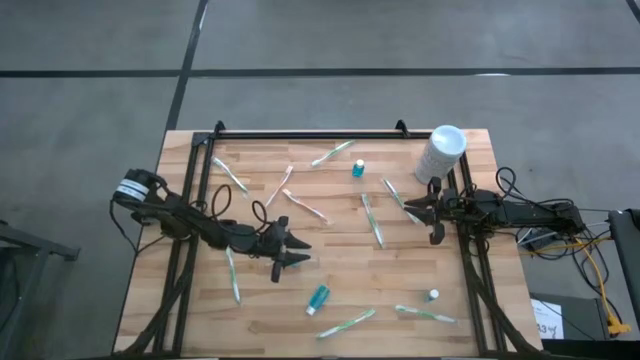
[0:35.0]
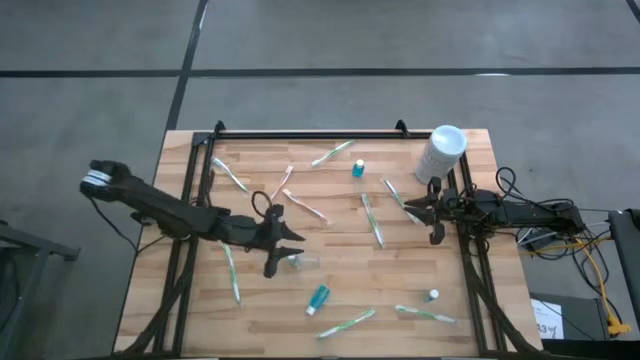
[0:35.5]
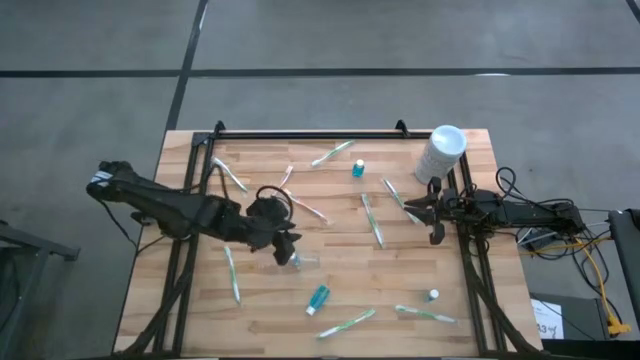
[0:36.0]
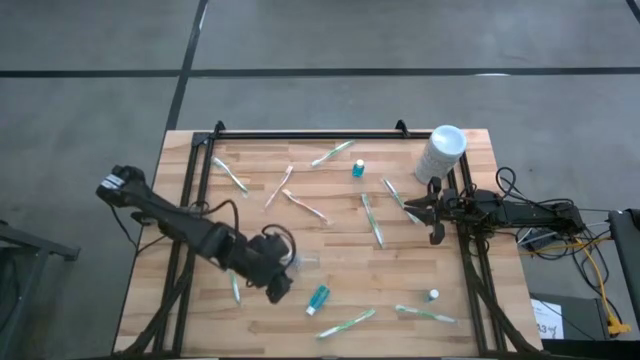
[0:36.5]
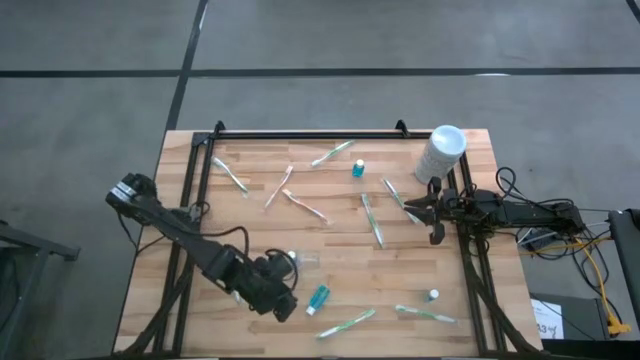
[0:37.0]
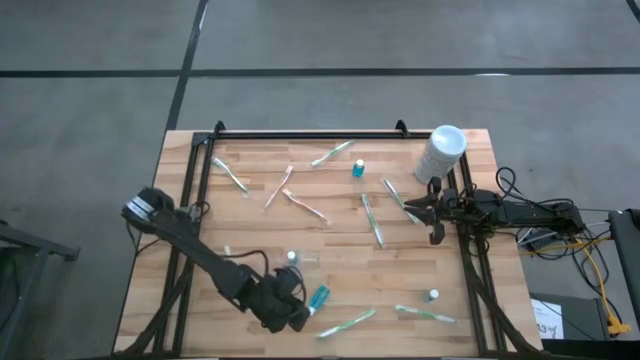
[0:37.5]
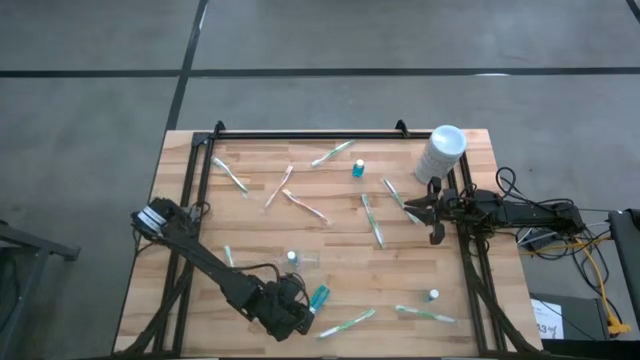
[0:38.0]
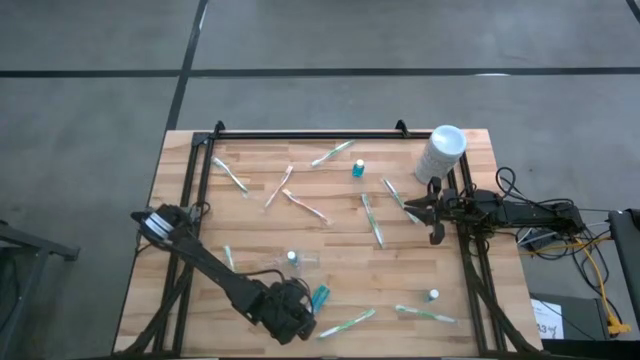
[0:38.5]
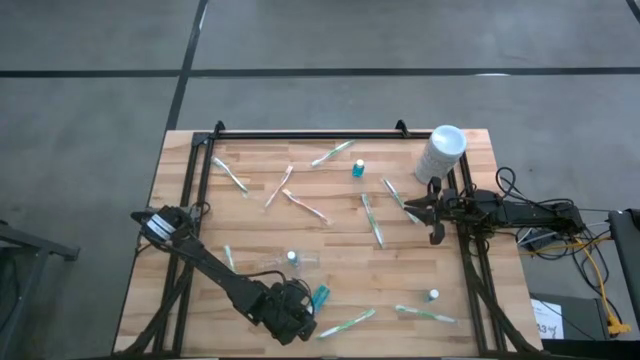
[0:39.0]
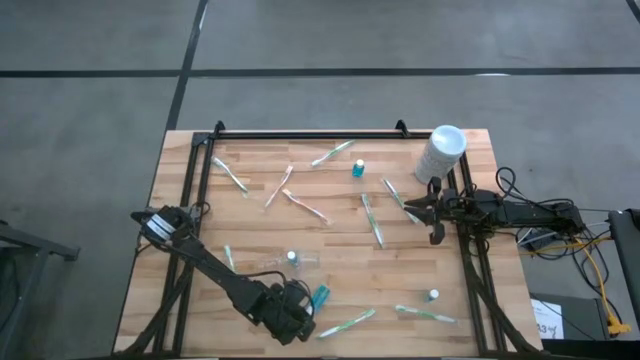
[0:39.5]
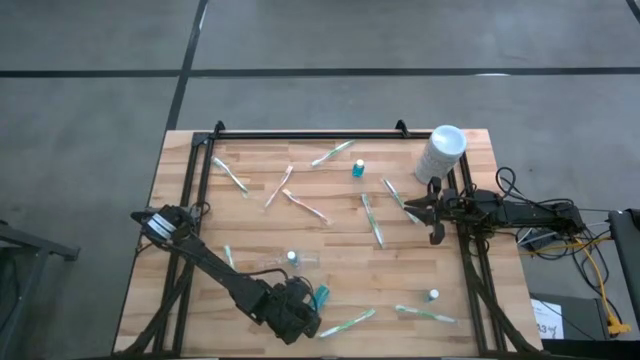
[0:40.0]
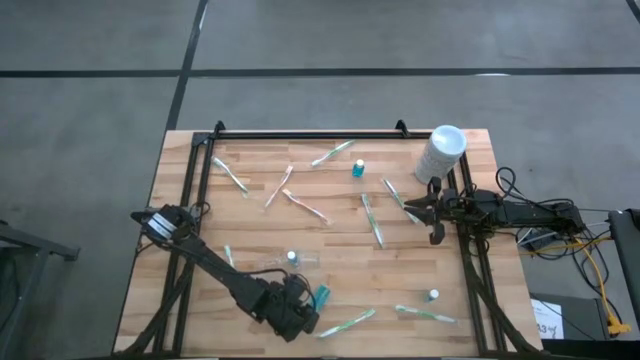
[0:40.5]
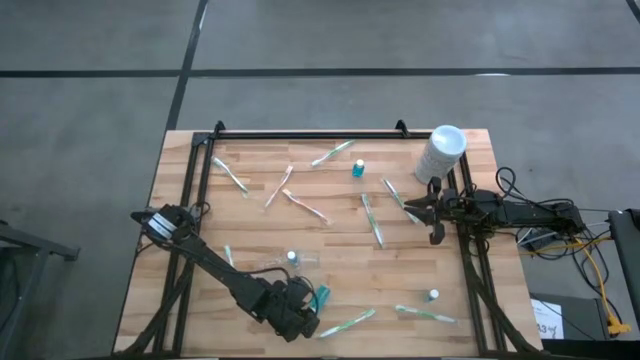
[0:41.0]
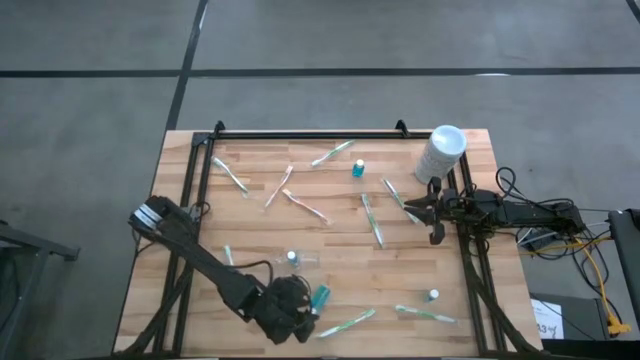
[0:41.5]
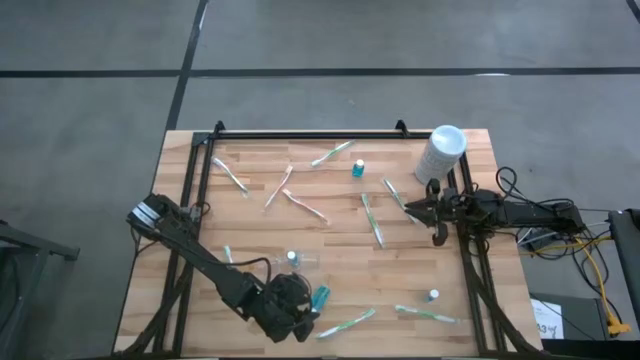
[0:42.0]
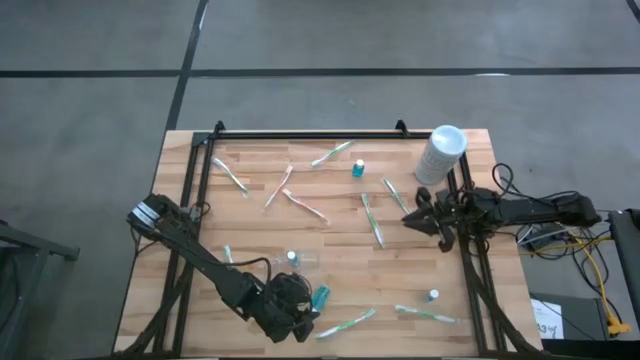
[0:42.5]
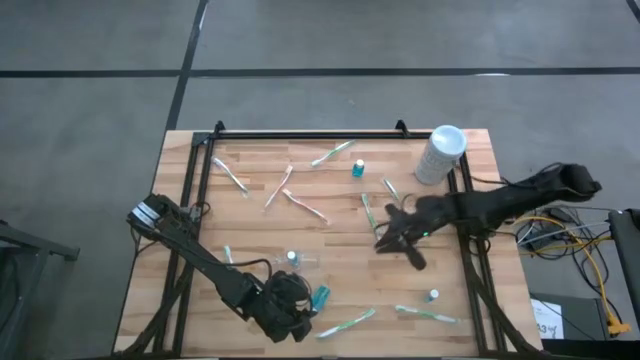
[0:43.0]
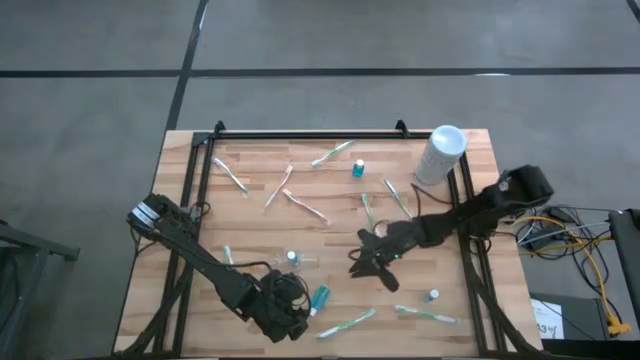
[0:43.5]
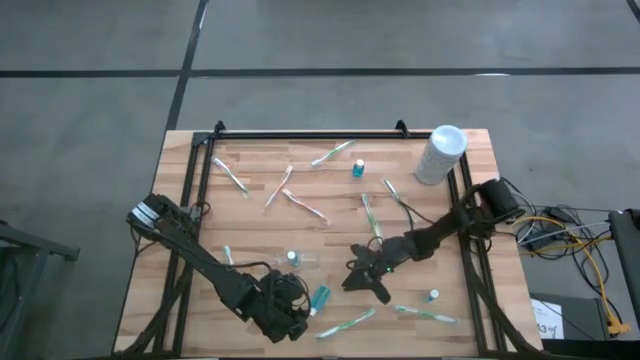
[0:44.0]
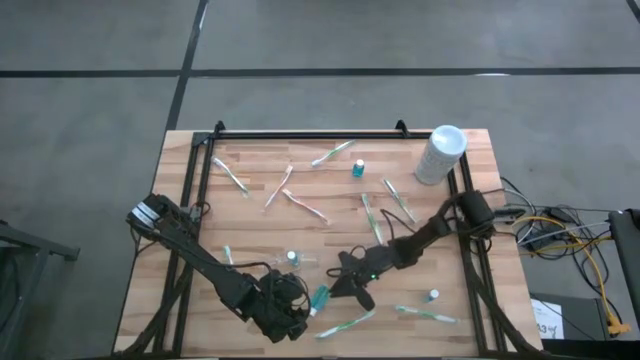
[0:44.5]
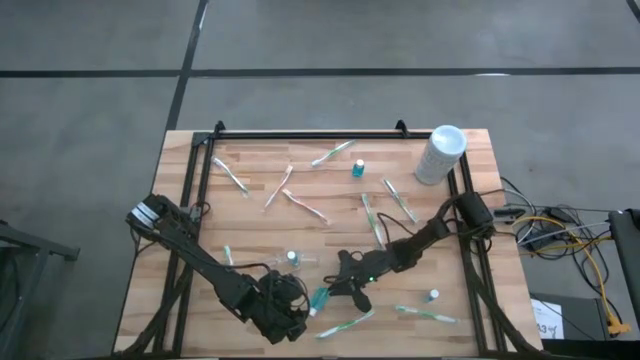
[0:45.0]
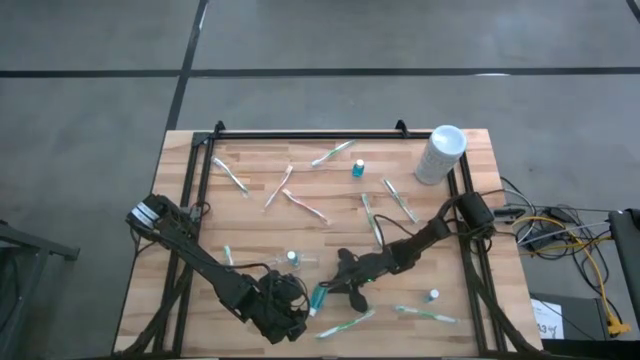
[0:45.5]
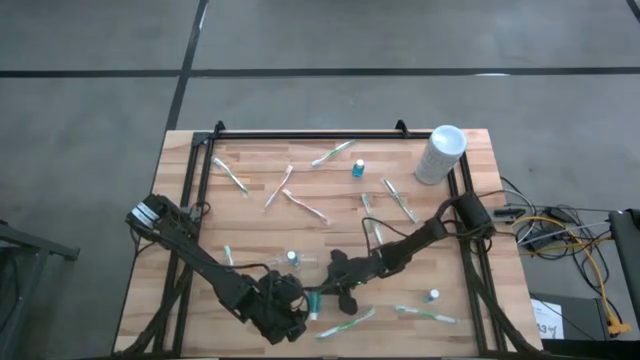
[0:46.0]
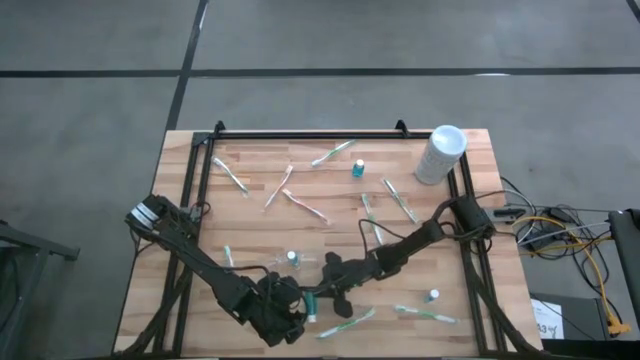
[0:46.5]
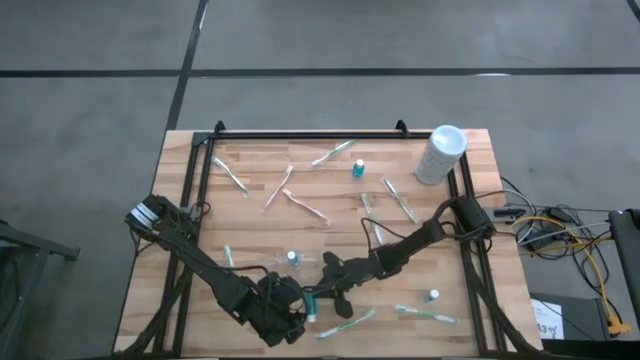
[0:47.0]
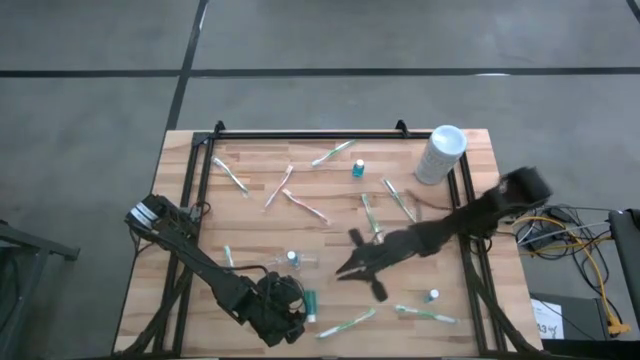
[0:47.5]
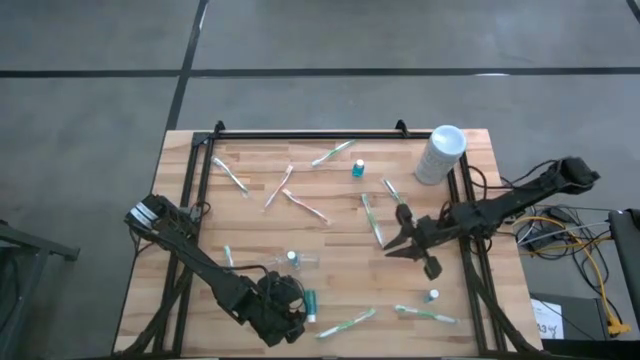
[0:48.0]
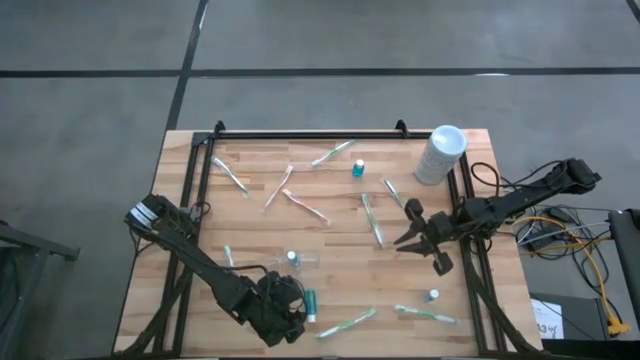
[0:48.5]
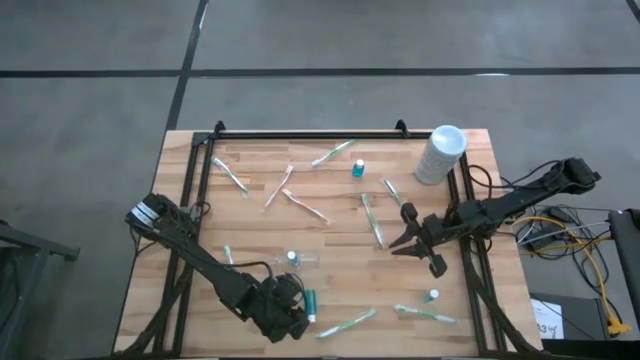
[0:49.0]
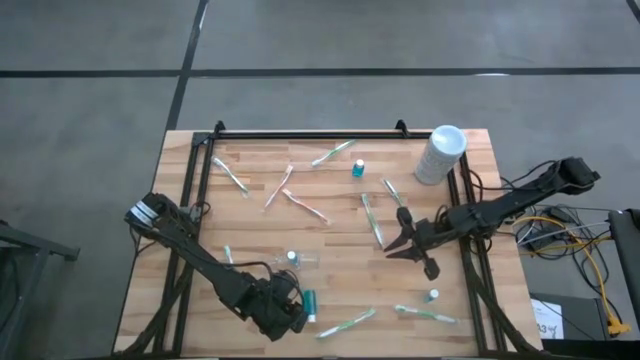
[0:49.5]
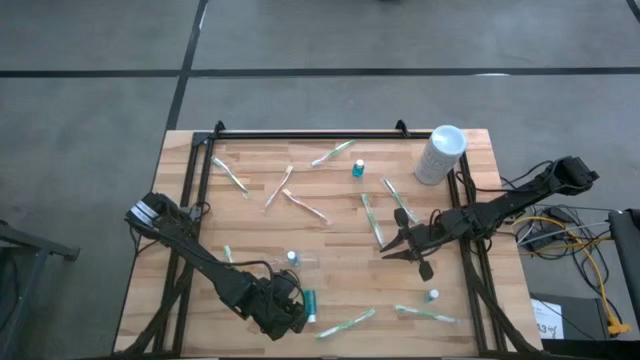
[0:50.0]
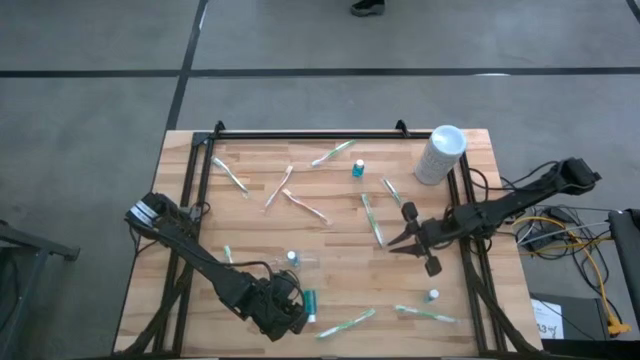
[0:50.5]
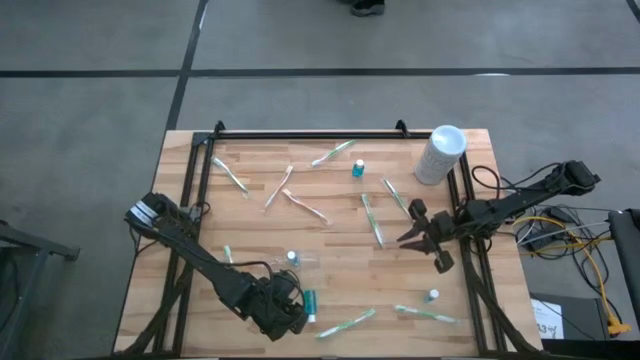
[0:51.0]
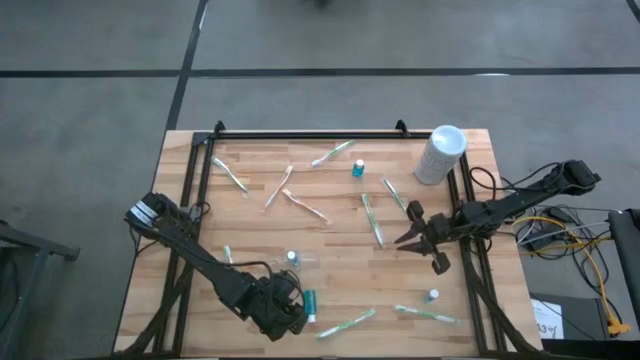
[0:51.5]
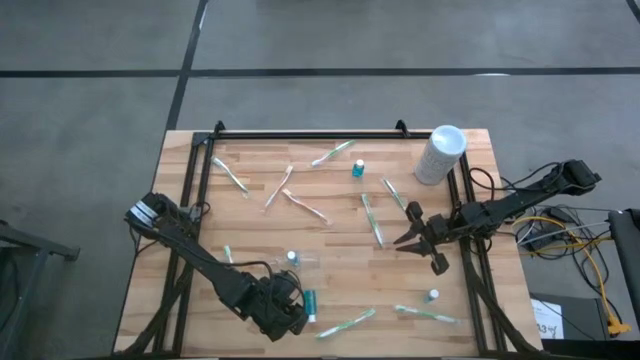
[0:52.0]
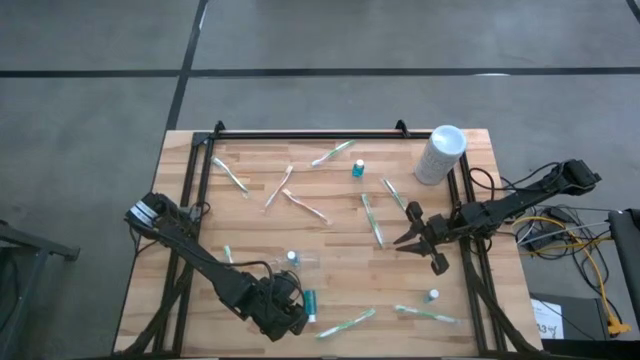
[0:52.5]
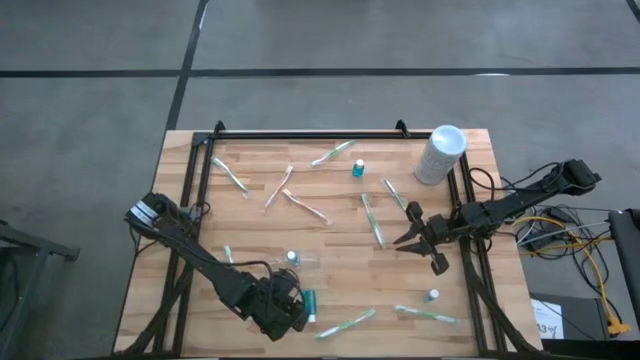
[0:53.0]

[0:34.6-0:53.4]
Task: Pick & Place toothbrushing station
Put the blue mouthwash into the transparent organizer

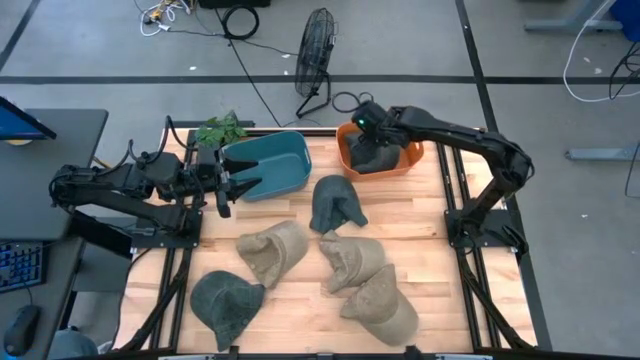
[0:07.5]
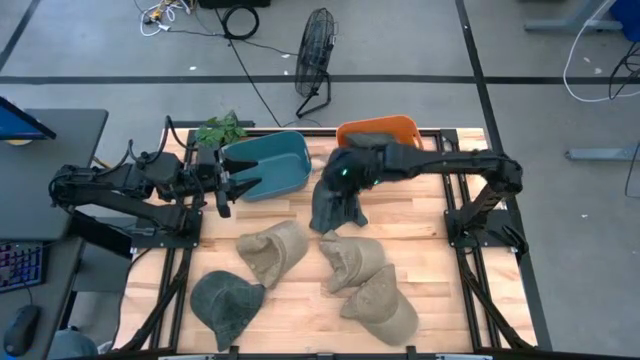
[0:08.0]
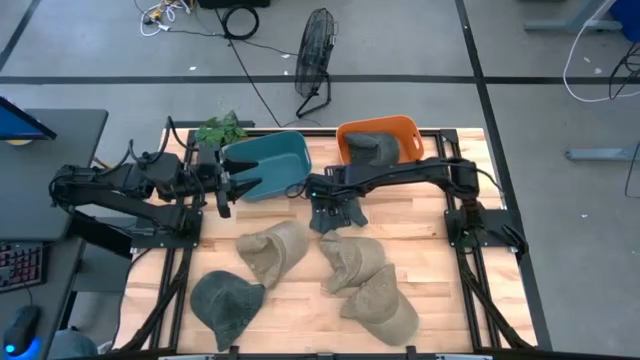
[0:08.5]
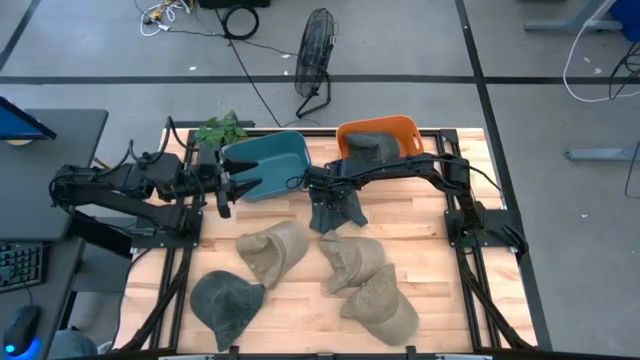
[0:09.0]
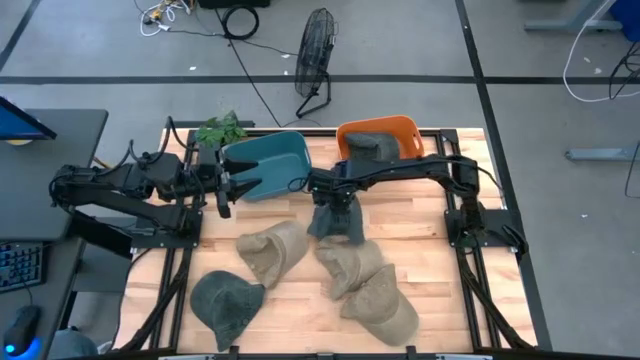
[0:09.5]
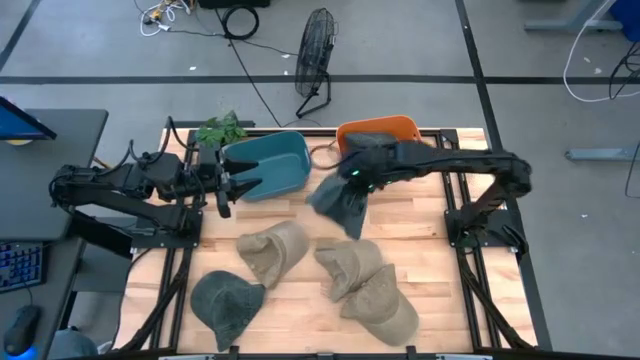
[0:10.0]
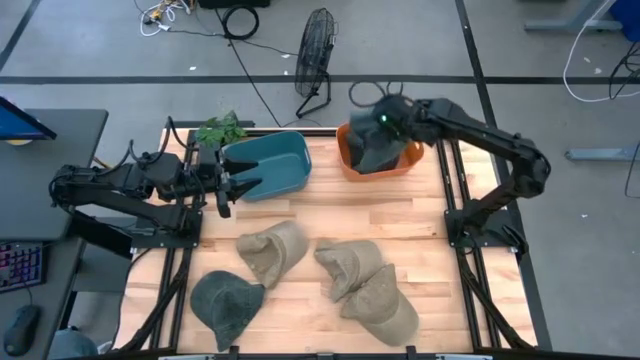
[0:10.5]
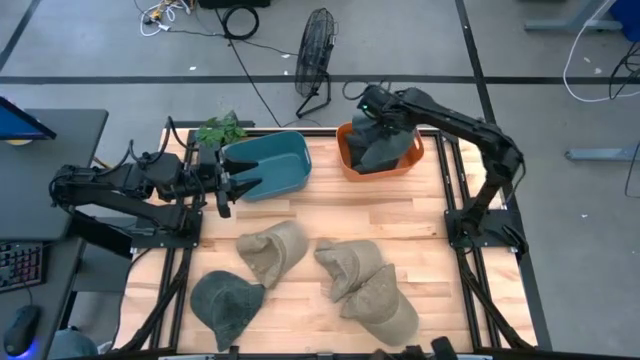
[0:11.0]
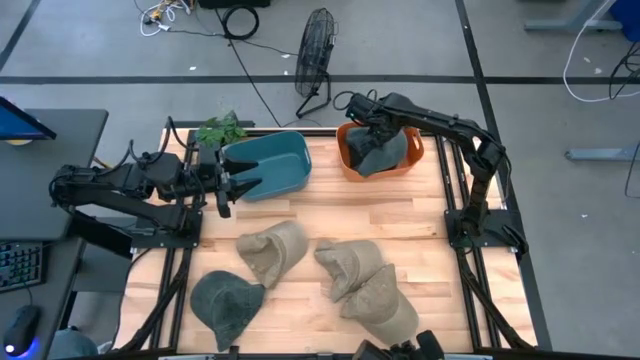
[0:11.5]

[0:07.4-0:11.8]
Task: Pick & Place hat
Put the right black cap into the orange bin
